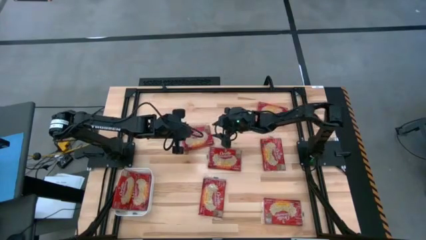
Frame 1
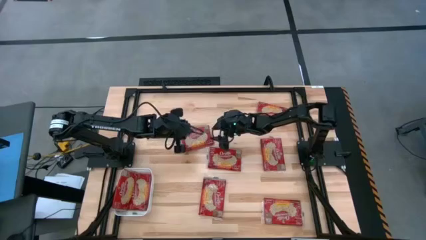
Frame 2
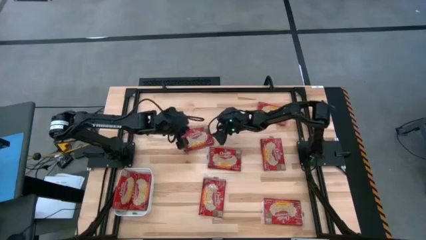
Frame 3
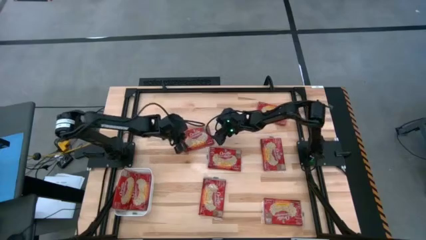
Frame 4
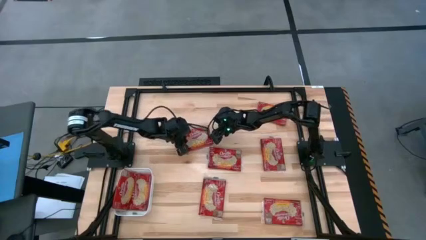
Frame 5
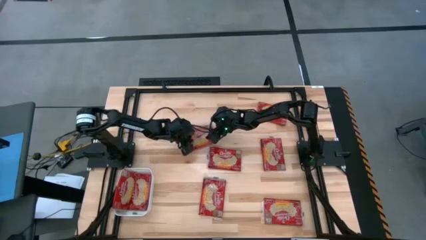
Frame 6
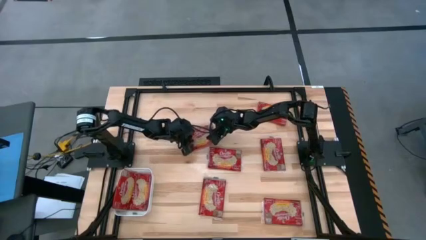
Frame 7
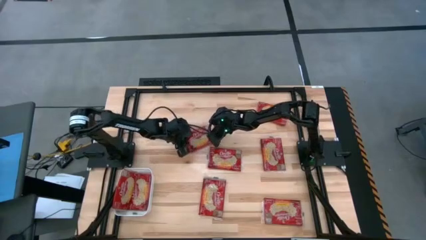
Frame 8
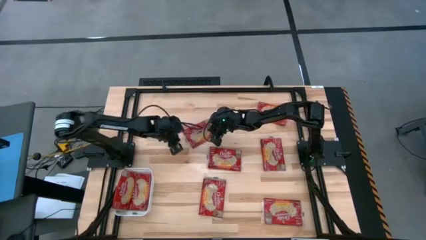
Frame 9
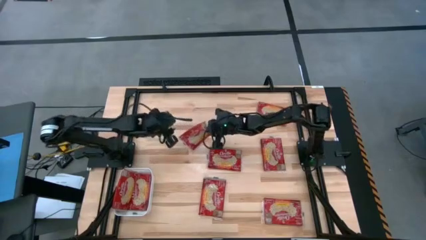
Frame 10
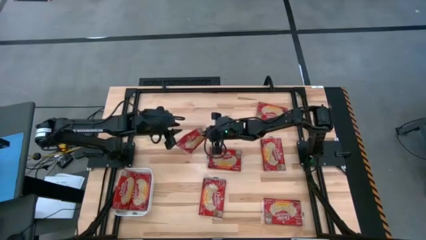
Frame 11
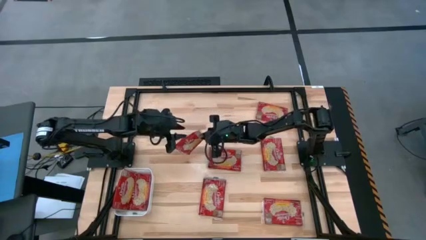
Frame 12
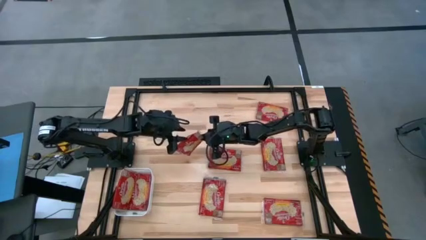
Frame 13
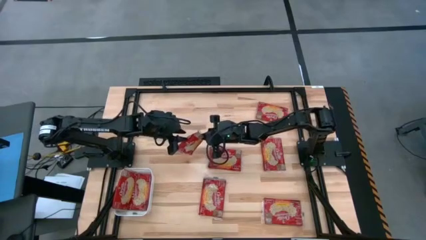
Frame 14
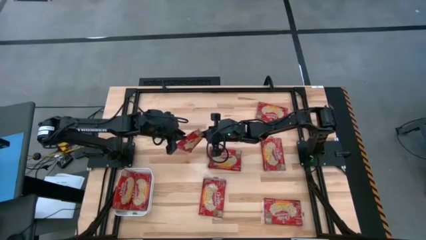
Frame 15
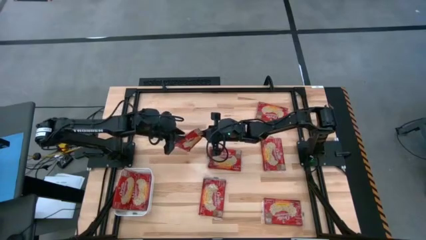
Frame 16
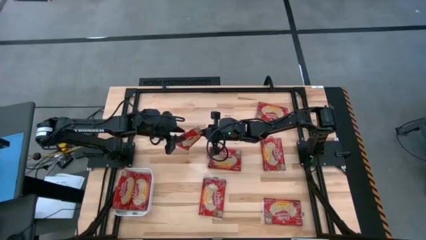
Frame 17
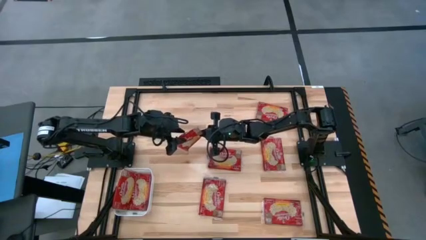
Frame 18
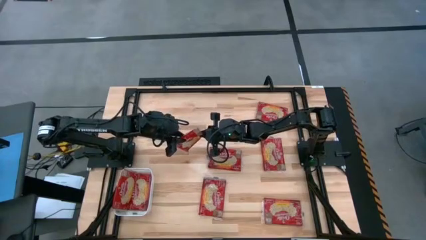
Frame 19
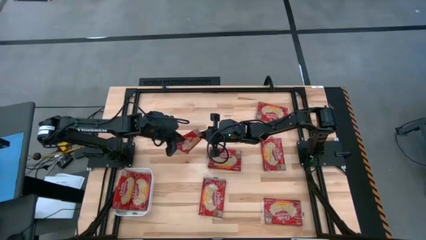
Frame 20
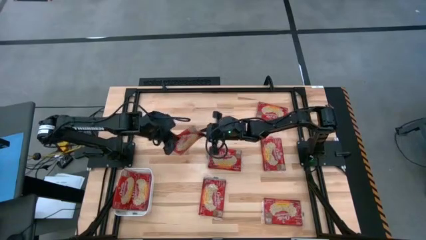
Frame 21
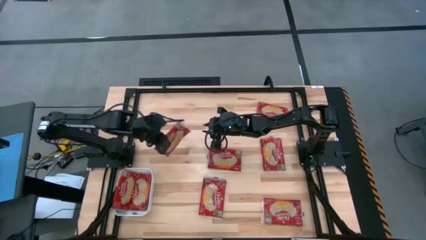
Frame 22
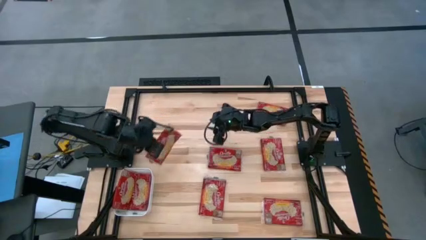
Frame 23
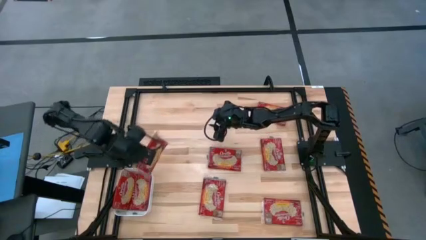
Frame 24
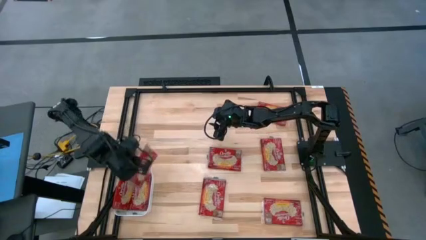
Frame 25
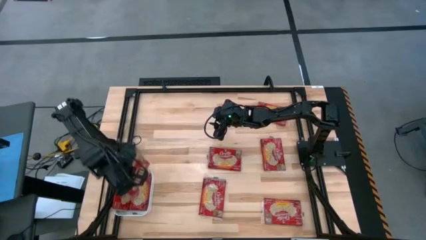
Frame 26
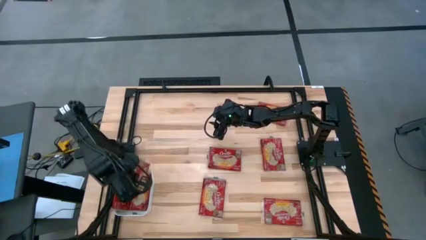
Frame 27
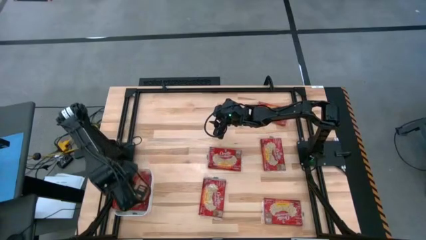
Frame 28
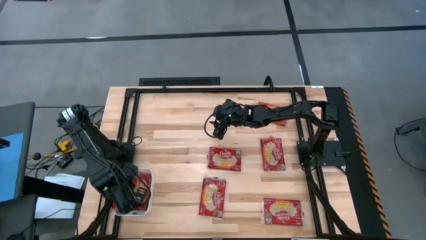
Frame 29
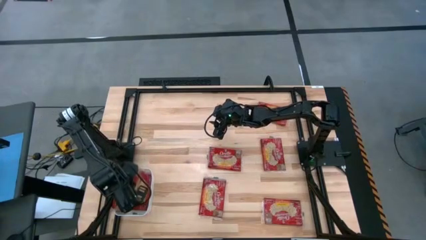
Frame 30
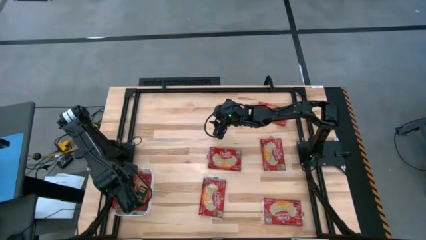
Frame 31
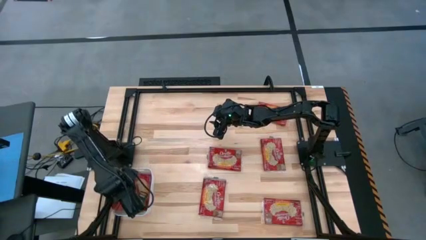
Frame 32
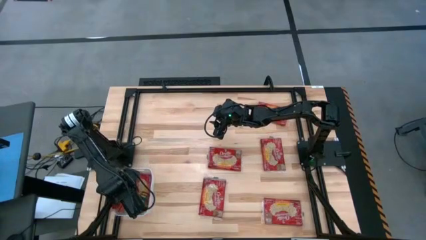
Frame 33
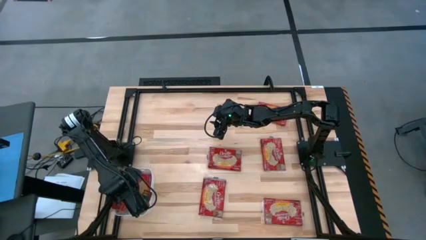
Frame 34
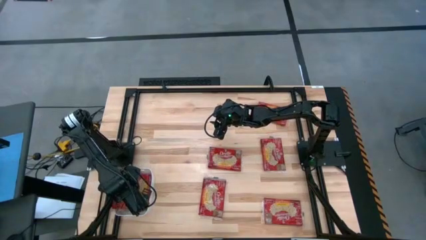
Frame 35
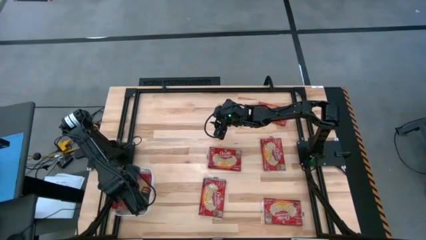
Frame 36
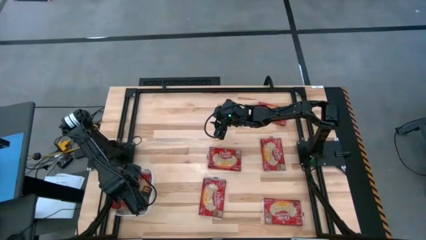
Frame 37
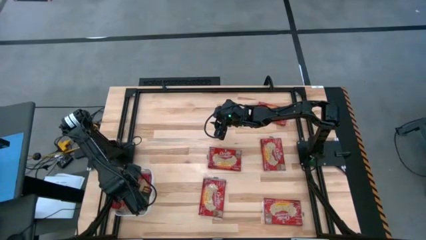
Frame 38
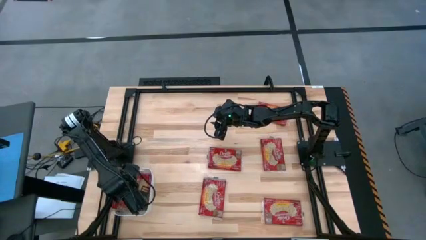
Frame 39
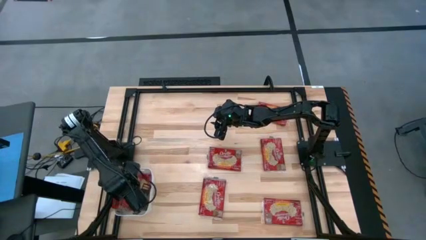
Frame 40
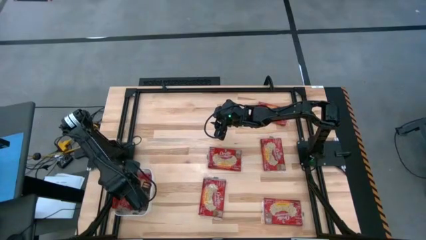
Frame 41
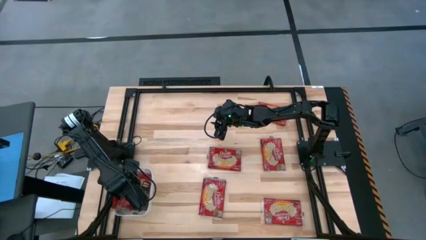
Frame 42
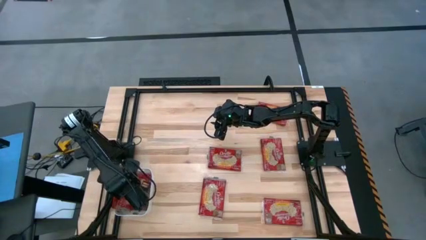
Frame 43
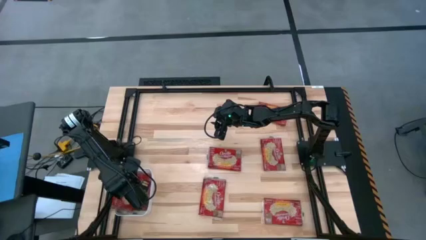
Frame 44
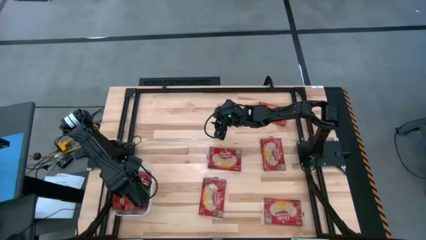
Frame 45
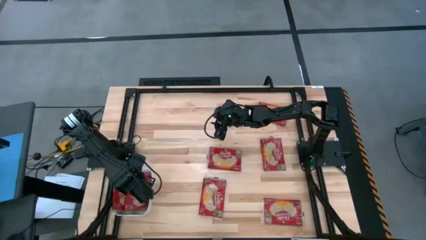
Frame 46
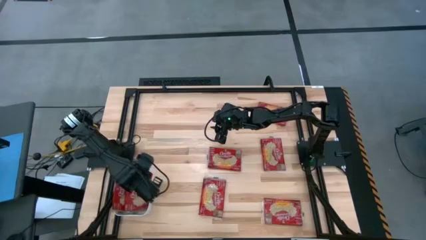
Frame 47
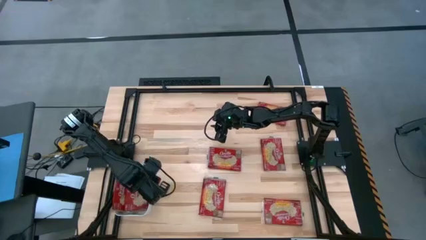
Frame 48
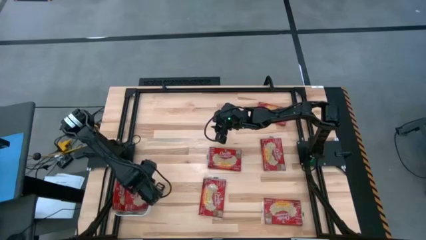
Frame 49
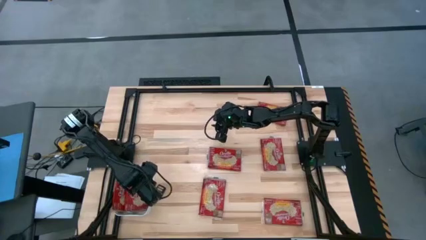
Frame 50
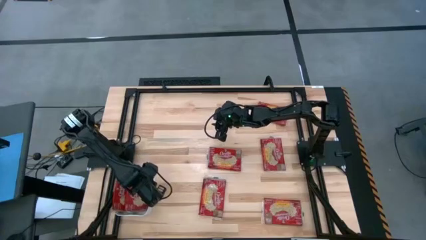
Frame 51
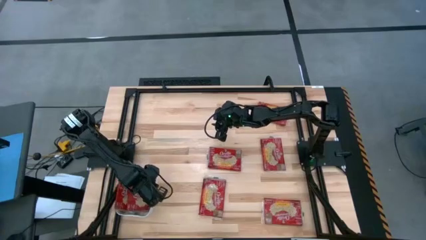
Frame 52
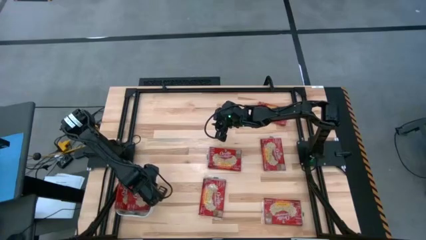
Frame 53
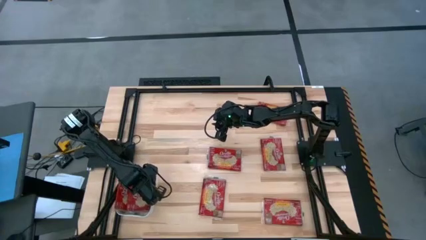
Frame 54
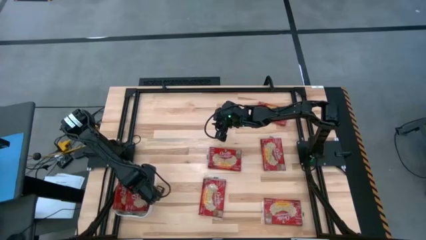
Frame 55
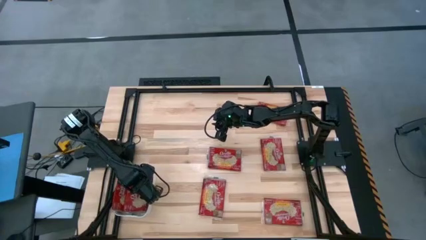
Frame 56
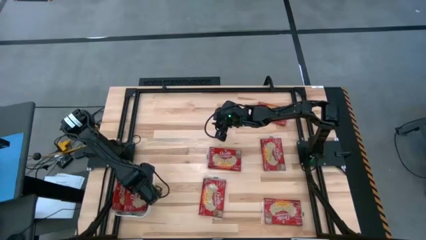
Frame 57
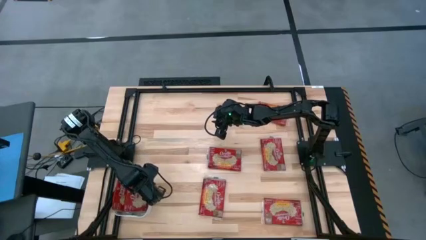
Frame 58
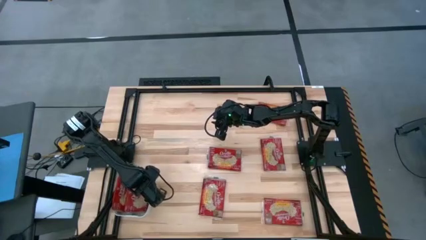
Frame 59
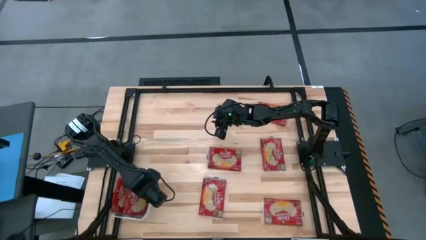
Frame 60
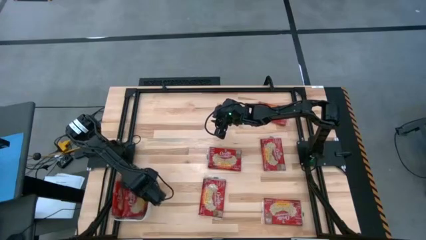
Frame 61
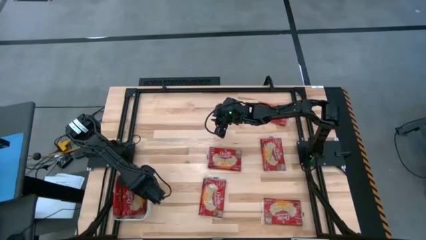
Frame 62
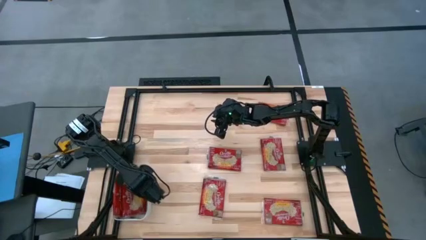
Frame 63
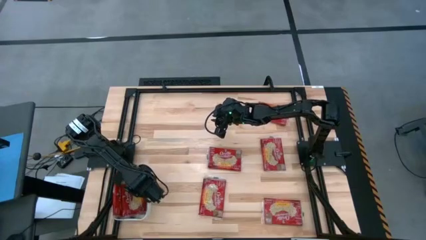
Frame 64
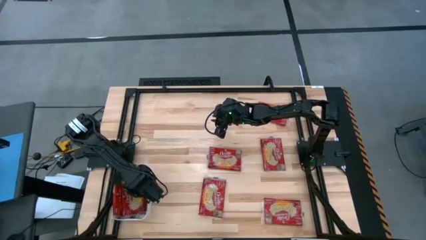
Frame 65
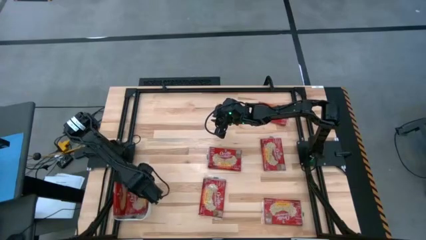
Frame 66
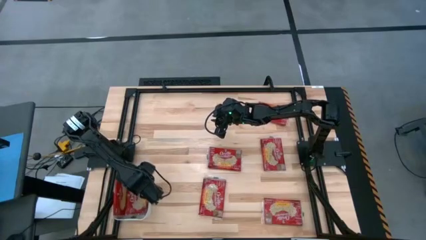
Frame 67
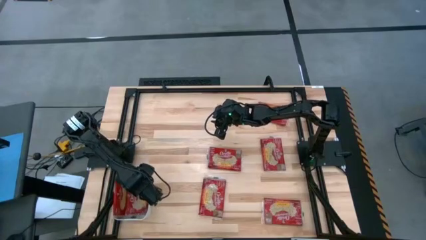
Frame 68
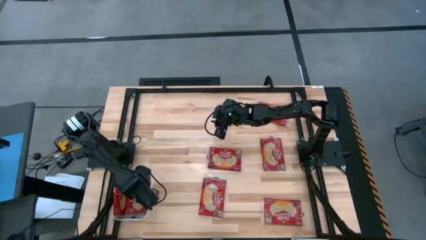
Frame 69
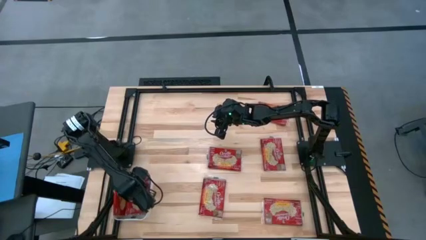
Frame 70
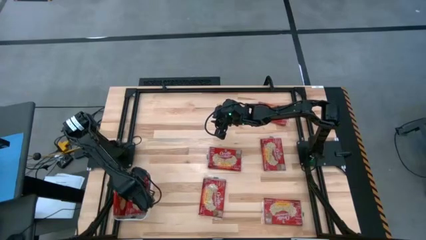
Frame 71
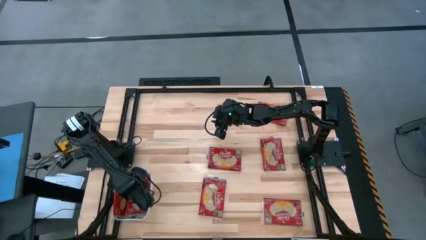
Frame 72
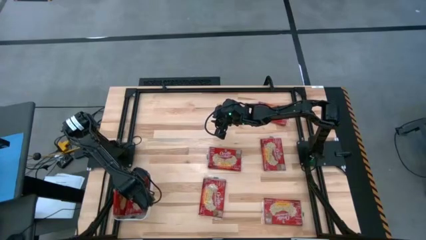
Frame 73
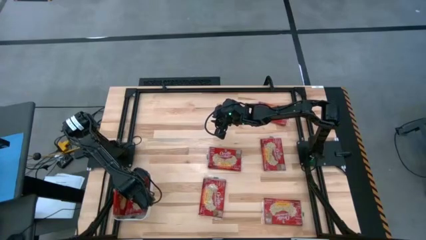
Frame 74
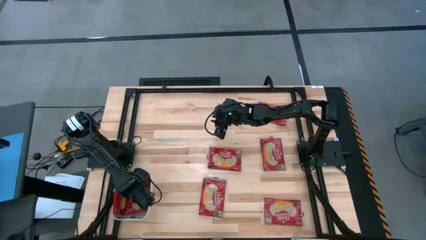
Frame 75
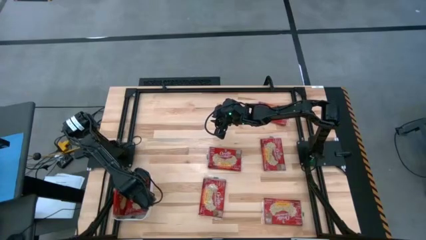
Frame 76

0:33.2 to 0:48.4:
Task: Sort popcorn bags into baskets
Put the red popcorn bag into the white bin
